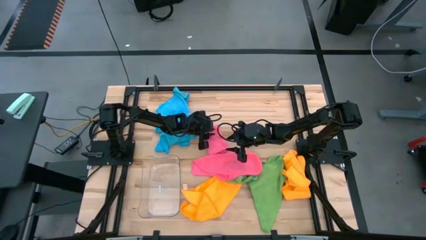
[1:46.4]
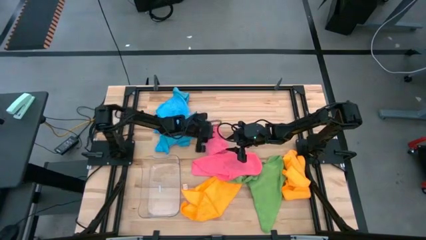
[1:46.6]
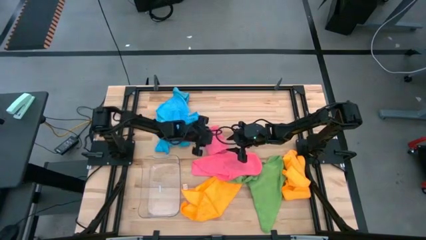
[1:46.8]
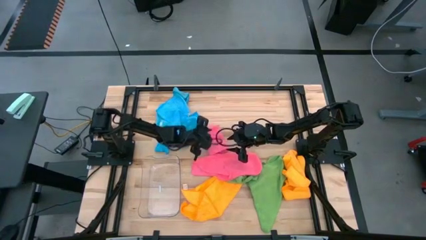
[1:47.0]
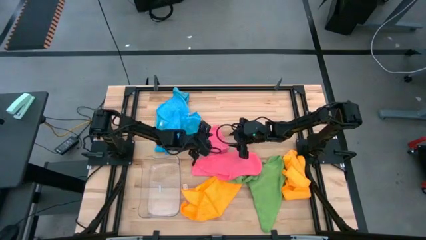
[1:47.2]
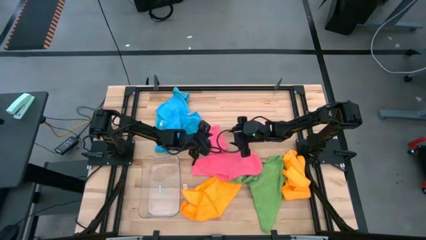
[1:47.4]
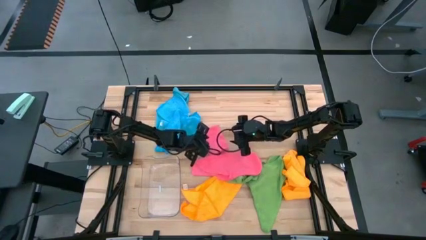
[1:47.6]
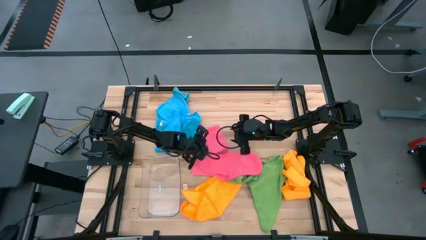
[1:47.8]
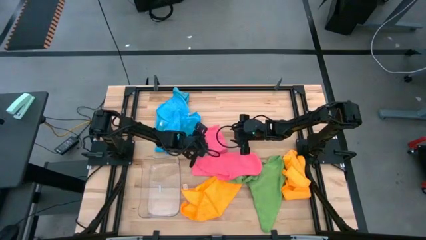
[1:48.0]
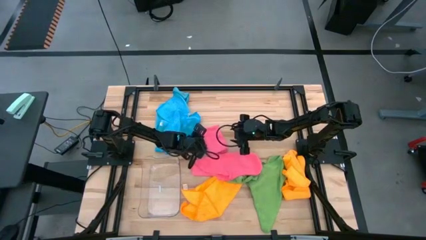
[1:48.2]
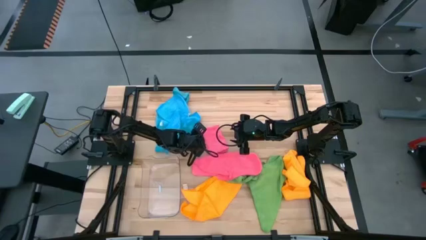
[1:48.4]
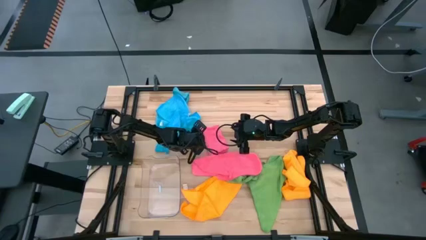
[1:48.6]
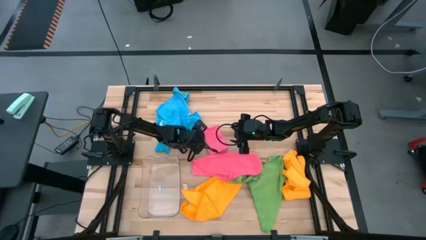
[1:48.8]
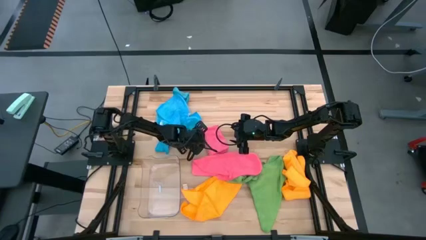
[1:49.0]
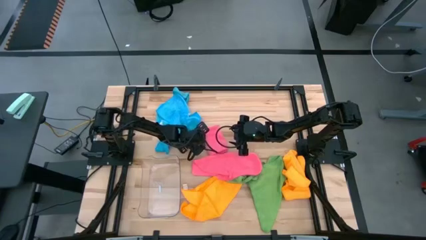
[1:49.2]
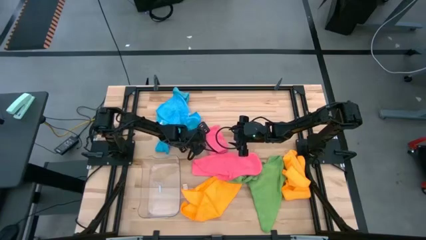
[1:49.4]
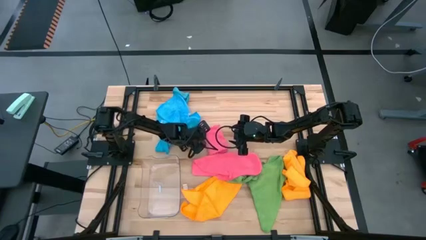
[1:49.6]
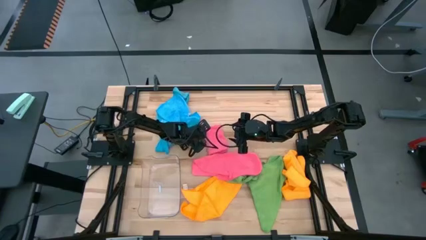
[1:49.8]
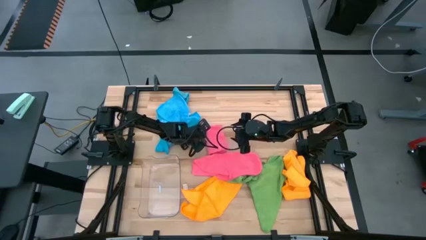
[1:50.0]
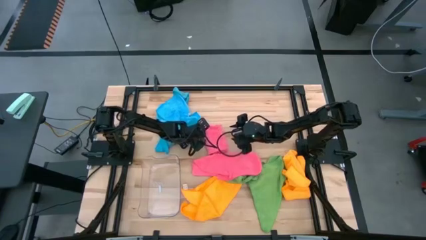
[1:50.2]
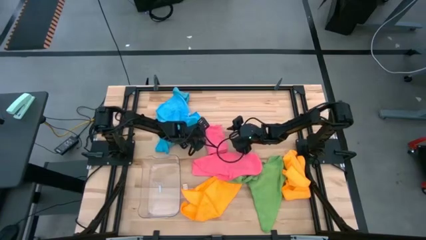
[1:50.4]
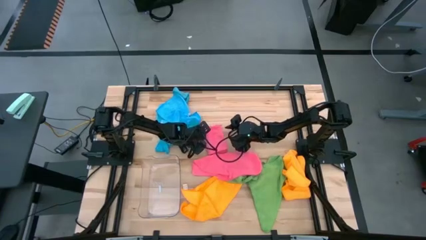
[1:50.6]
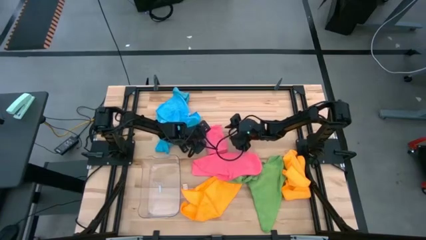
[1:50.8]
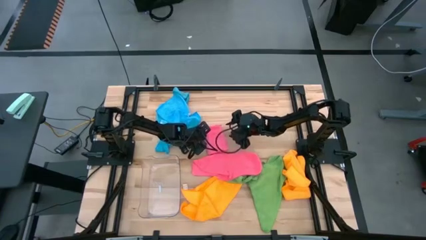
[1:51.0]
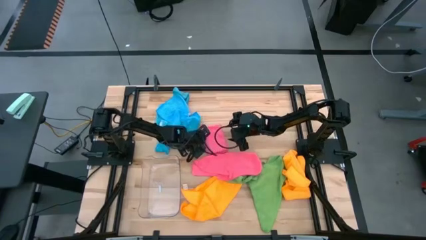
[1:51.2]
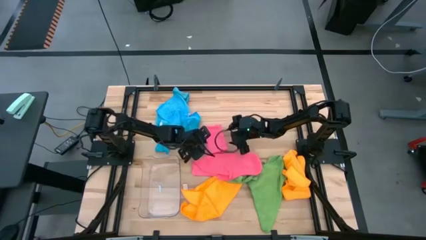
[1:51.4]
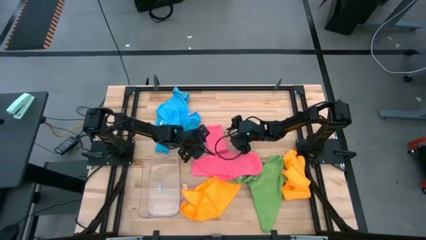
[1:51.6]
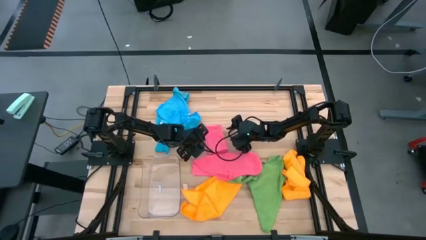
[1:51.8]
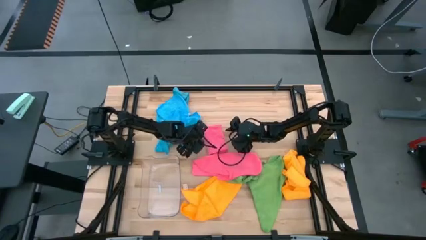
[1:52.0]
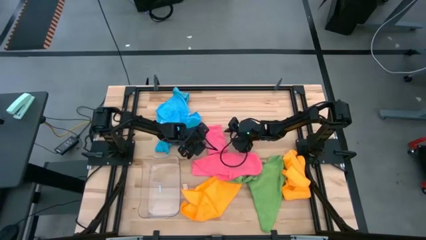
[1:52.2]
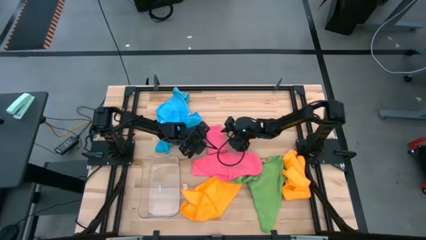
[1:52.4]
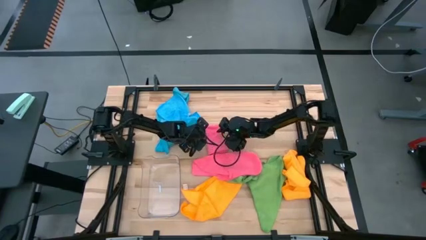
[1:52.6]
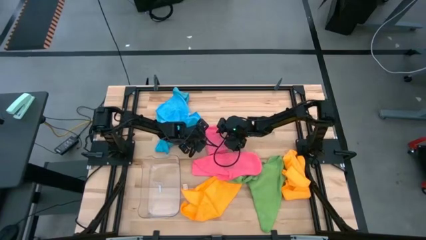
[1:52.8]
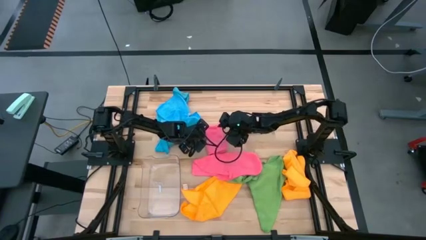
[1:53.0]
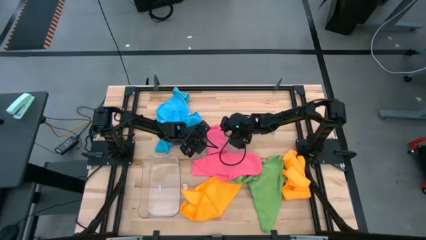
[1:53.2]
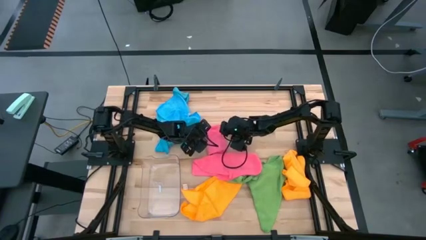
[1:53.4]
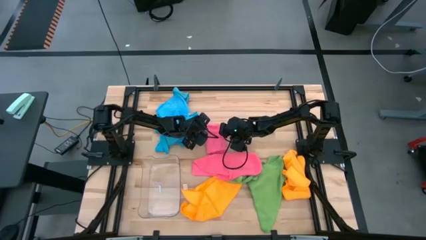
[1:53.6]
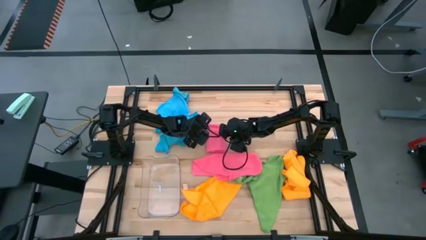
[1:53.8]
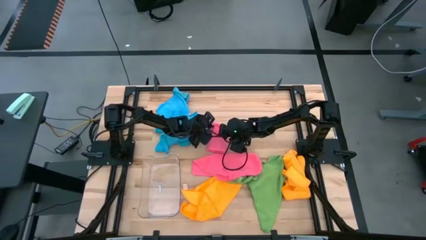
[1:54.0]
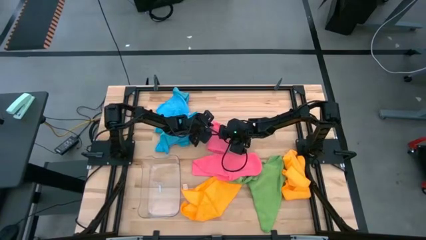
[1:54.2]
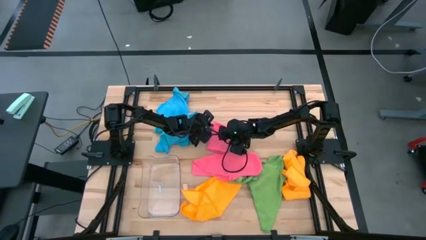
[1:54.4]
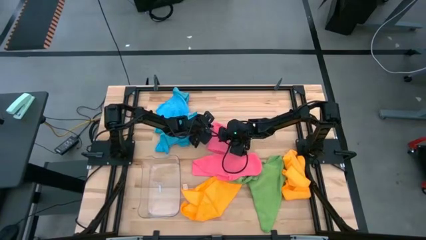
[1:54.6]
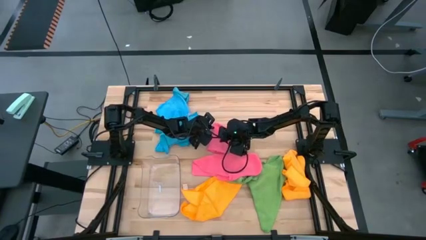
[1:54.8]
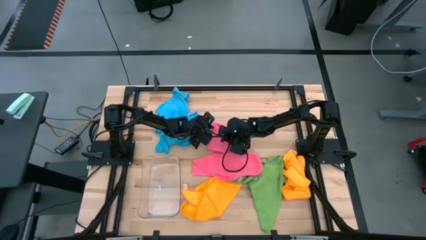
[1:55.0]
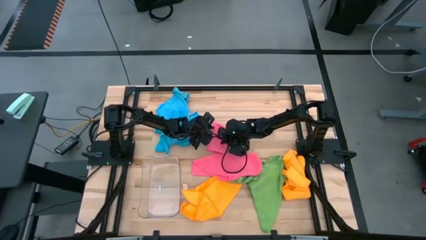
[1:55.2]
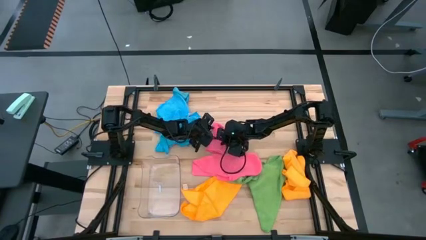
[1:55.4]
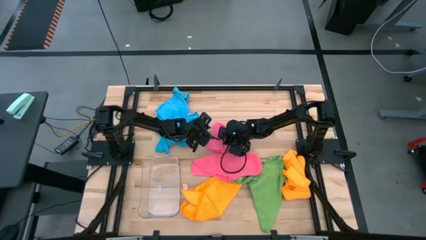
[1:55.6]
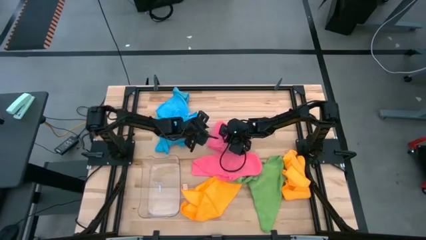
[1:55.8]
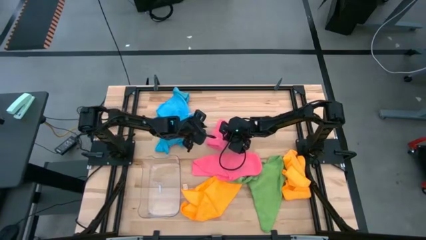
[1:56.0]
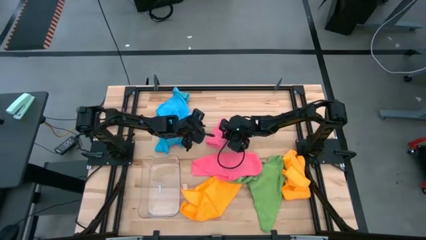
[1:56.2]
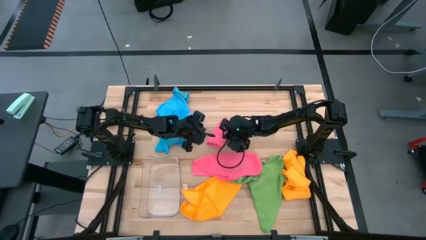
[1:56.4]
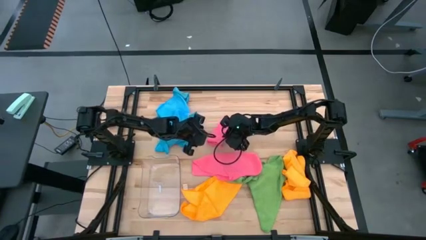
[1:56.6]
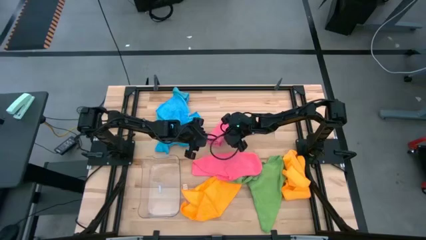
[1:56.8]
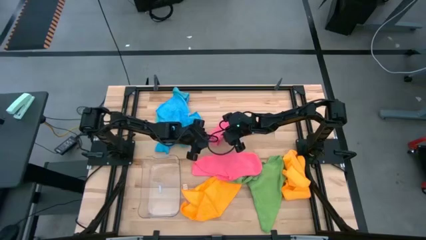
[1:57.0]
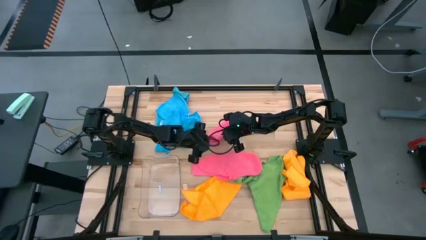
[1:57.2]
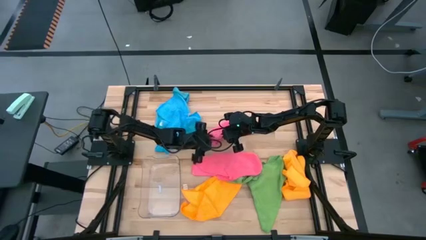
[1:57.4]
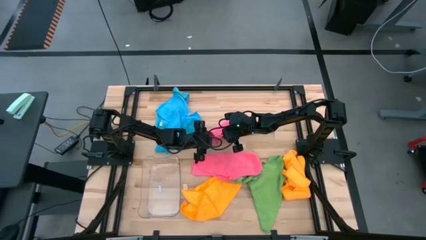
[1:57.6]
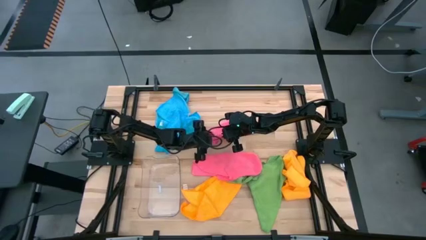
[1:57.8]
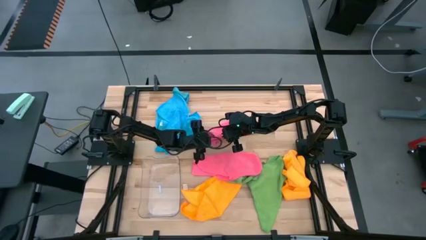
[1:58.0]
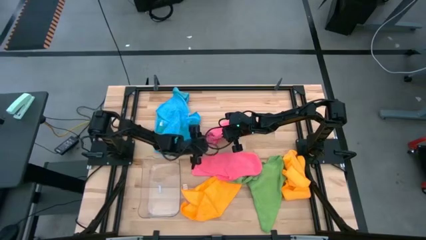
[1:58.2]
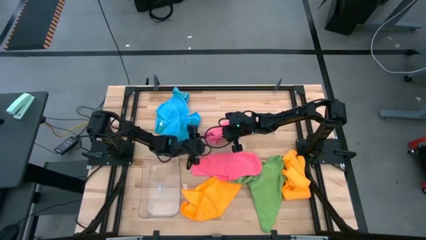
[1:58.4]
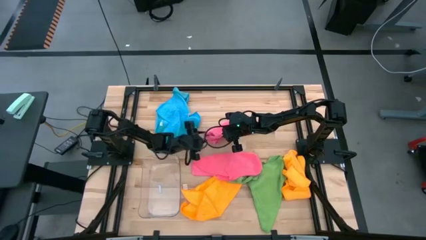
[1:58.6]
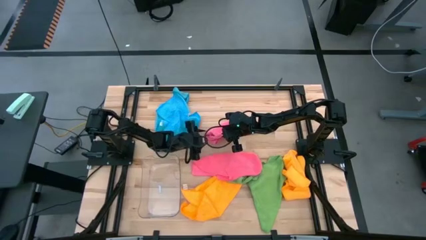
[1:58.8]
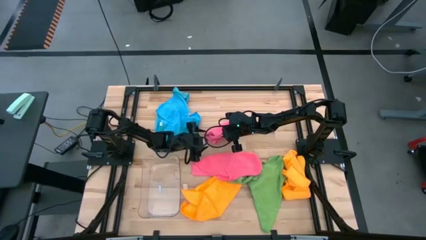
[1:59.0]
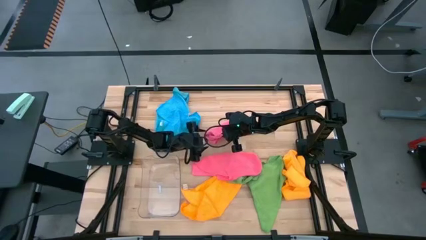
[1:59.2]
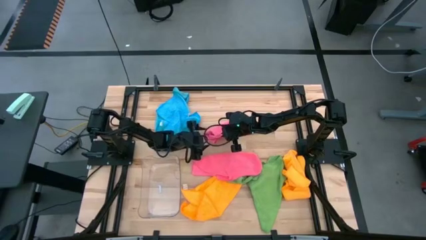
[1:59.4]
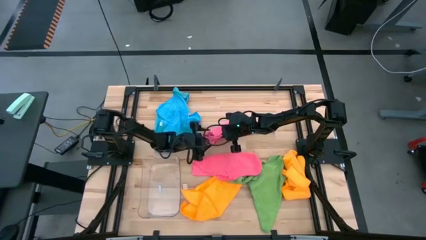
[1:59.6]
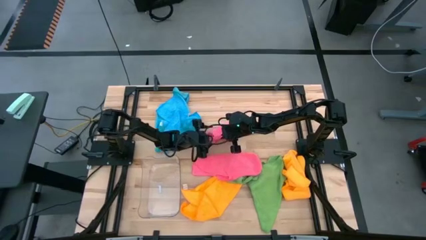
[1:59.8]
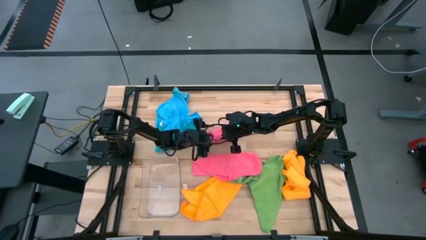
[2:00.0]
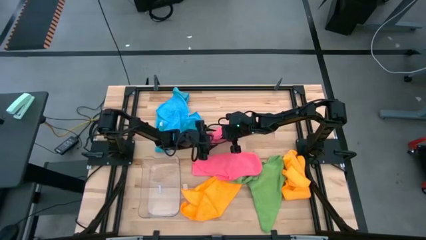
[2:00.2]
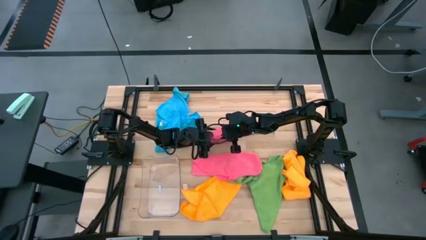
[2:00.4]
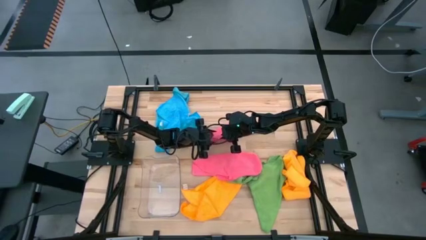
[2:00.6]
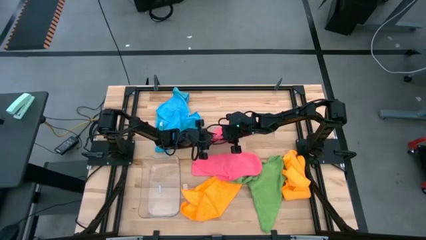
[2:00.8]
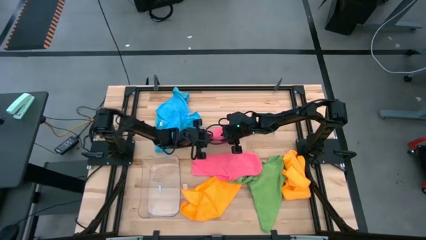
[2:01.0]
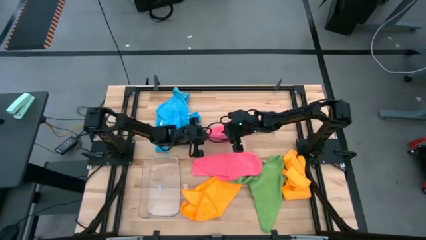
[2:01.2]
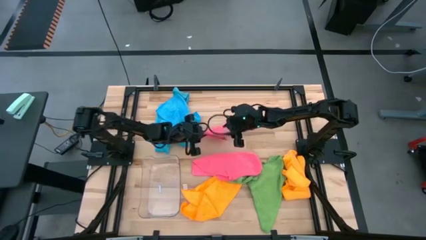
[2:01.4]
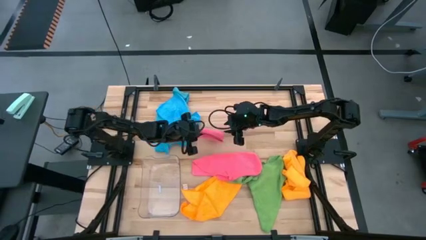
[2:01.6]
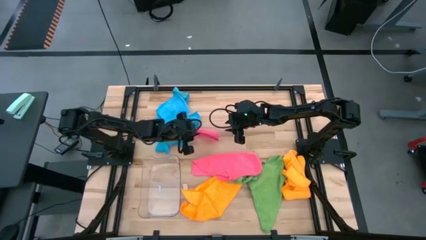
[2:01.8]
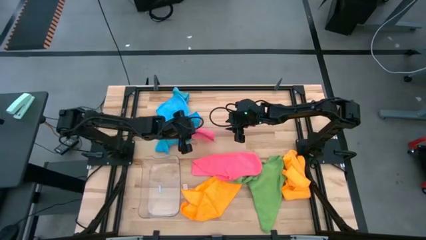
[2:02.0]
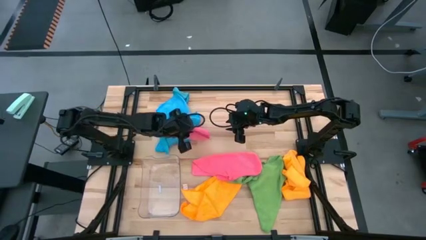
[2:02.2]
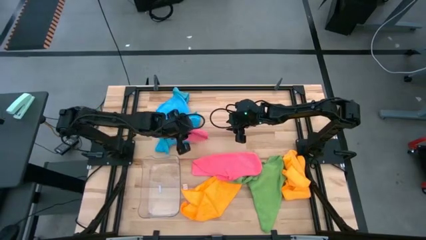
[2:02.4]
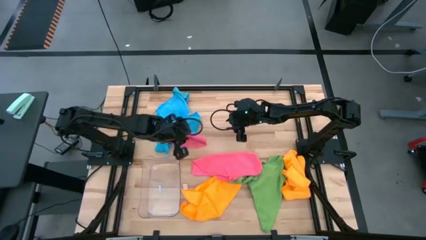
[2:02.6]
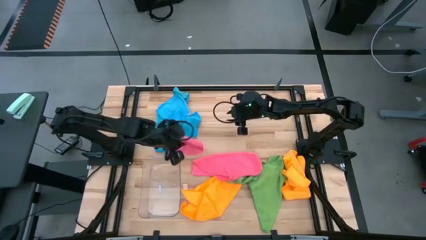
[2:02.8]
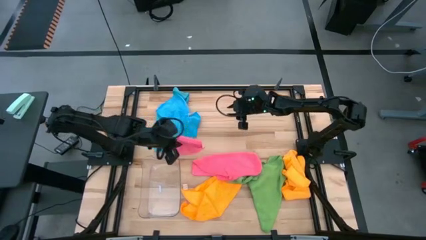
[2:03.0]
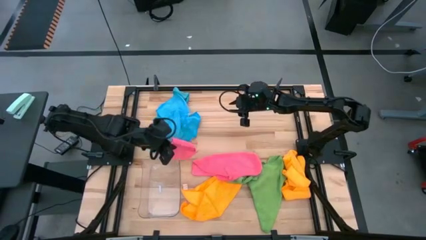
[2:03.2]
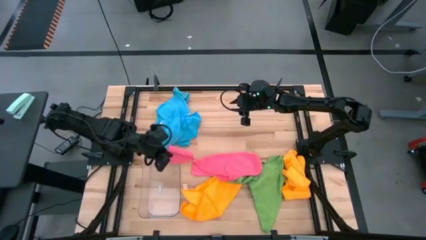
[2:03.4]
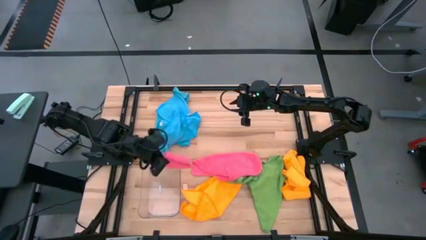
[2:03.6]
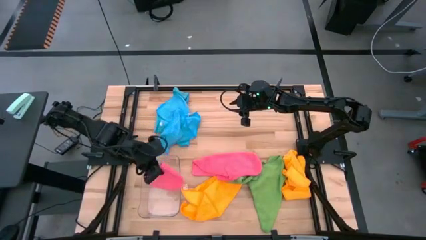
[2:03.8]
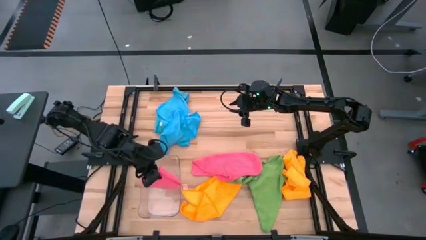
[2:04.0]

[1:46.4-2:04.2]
Task: Fold microfiber towels
Put the top pink microfiber cloth into the transparent bin
